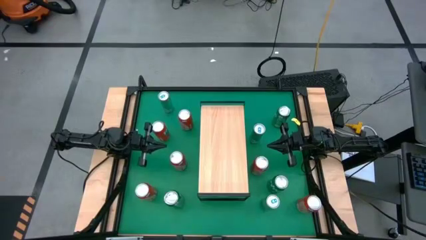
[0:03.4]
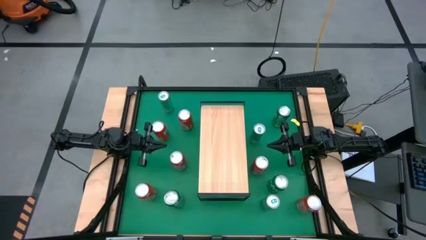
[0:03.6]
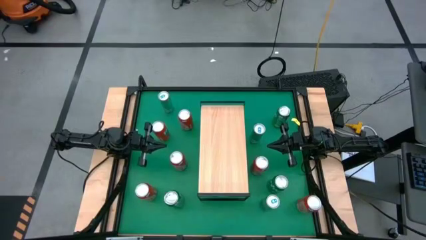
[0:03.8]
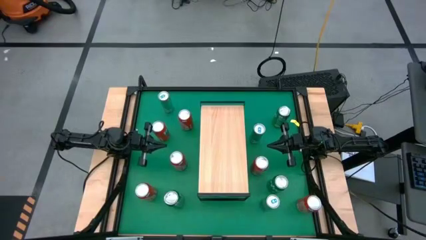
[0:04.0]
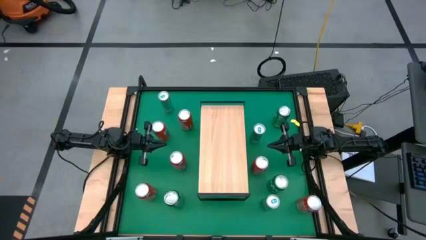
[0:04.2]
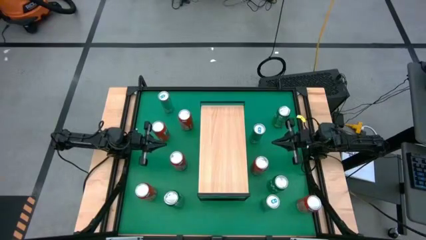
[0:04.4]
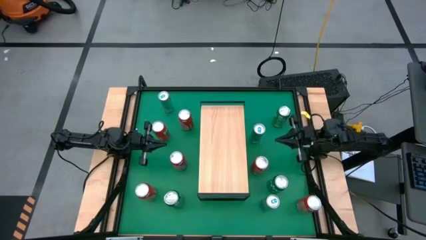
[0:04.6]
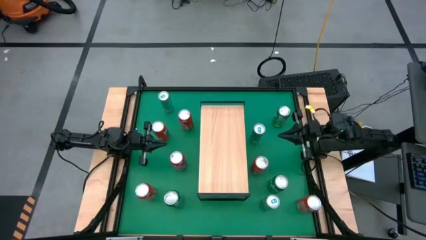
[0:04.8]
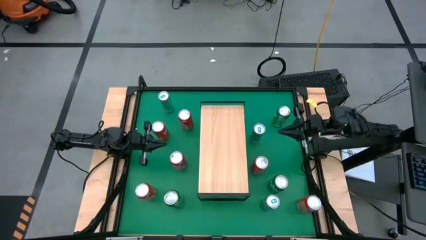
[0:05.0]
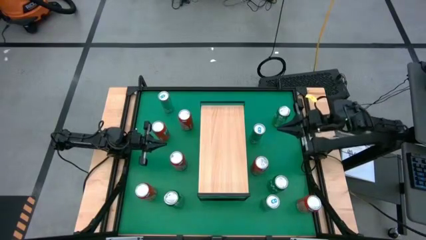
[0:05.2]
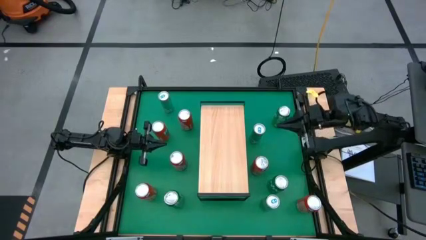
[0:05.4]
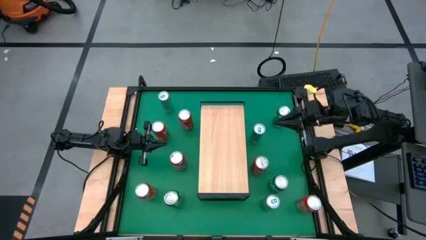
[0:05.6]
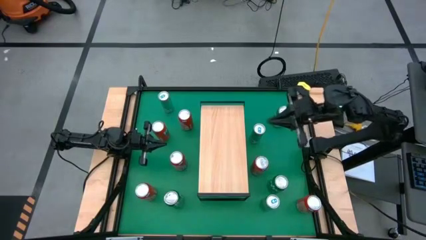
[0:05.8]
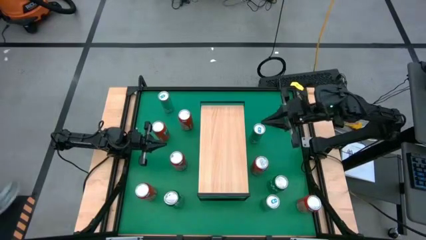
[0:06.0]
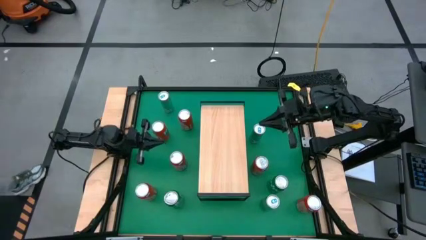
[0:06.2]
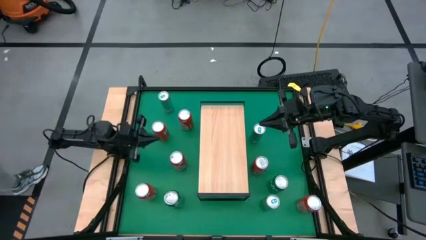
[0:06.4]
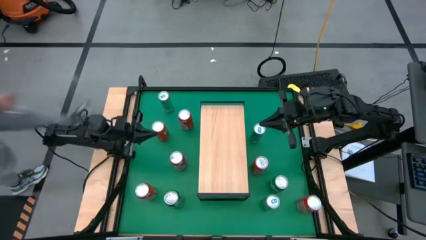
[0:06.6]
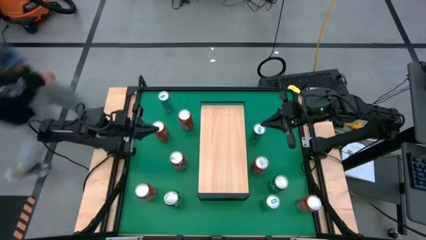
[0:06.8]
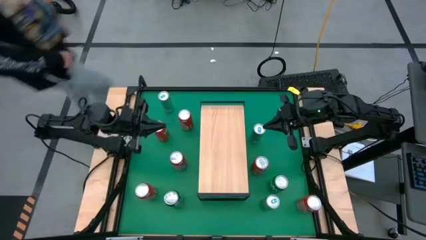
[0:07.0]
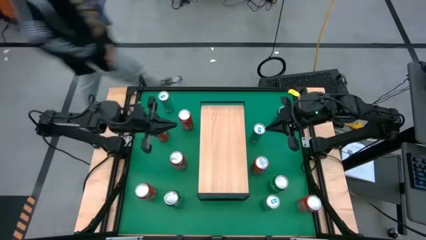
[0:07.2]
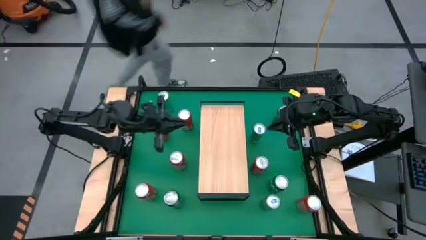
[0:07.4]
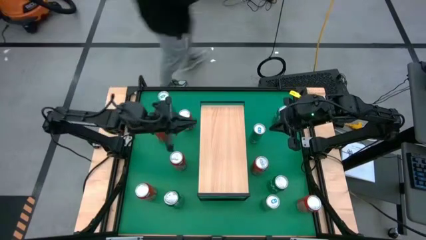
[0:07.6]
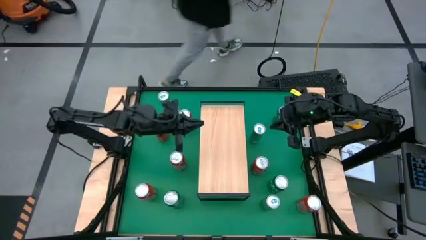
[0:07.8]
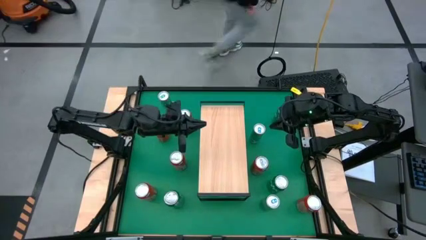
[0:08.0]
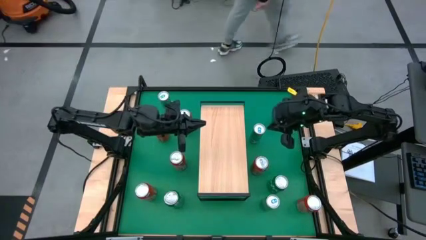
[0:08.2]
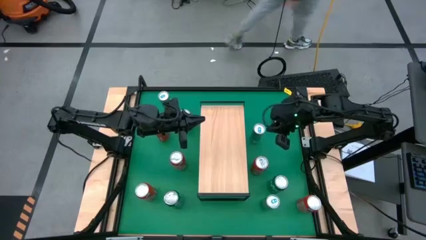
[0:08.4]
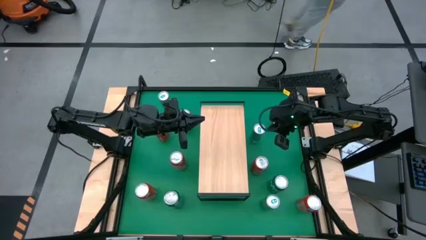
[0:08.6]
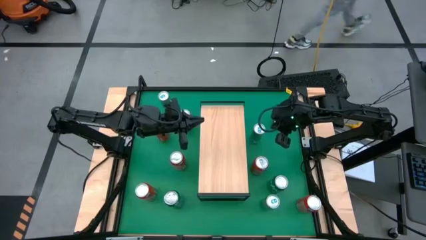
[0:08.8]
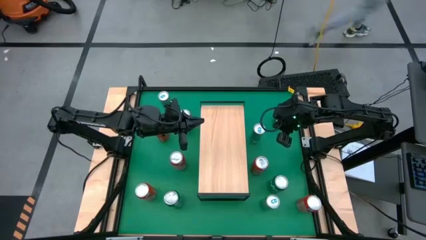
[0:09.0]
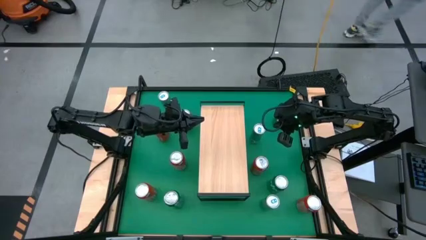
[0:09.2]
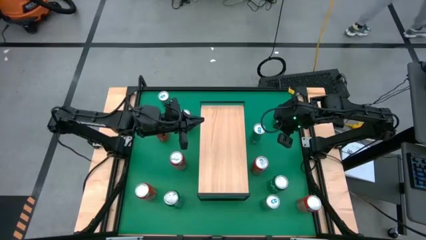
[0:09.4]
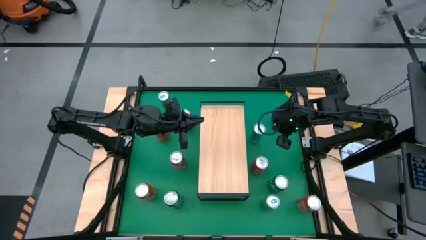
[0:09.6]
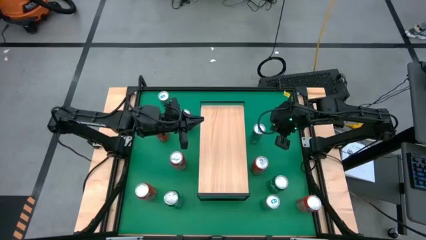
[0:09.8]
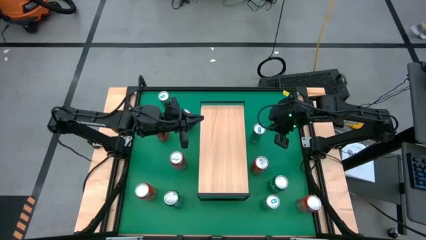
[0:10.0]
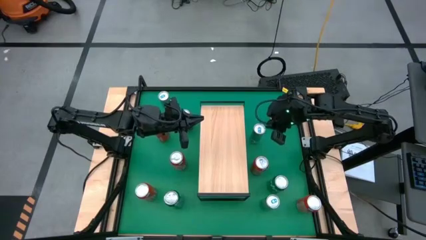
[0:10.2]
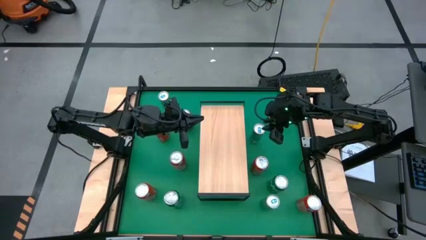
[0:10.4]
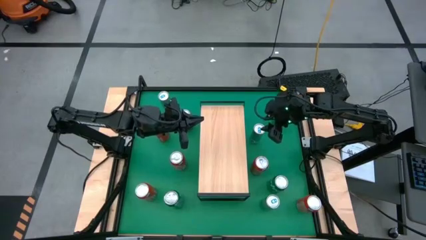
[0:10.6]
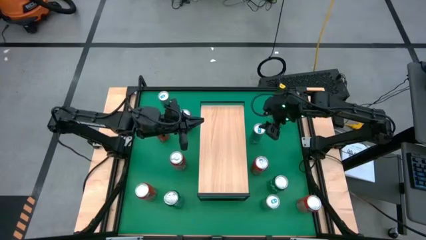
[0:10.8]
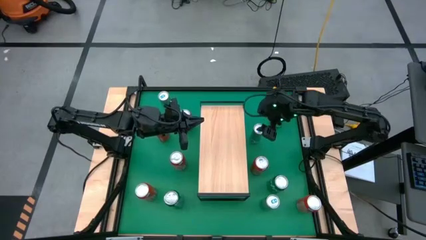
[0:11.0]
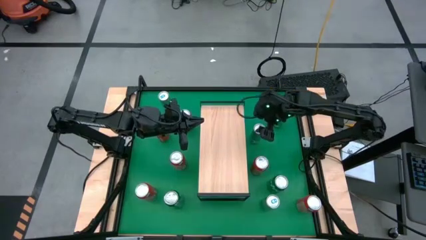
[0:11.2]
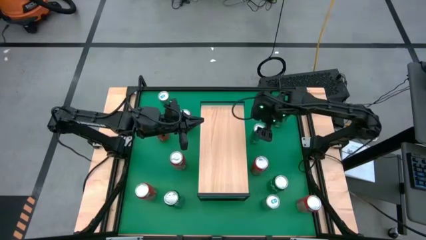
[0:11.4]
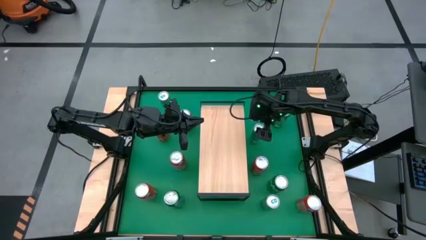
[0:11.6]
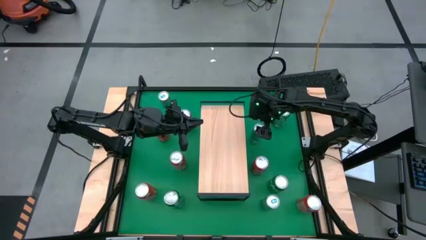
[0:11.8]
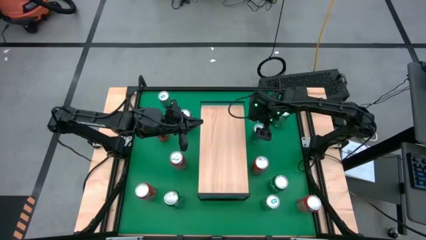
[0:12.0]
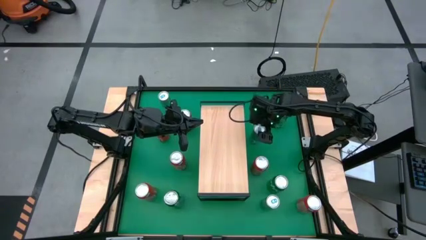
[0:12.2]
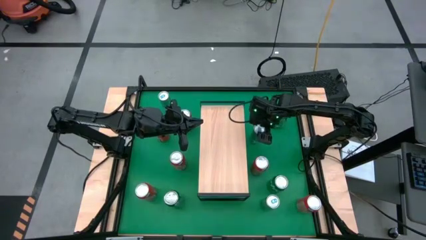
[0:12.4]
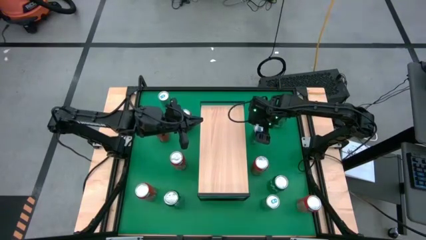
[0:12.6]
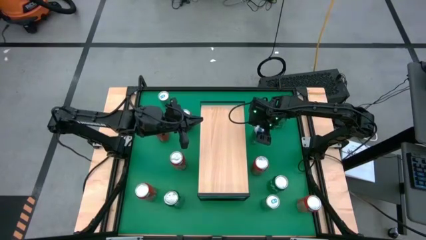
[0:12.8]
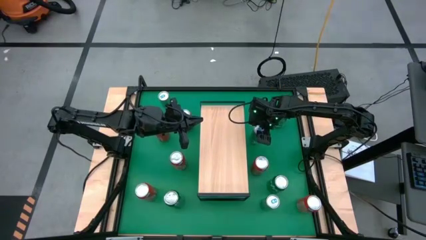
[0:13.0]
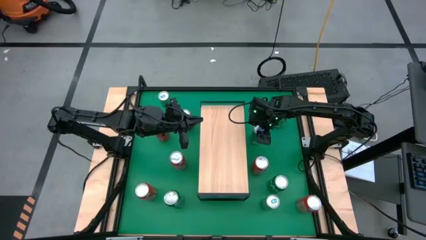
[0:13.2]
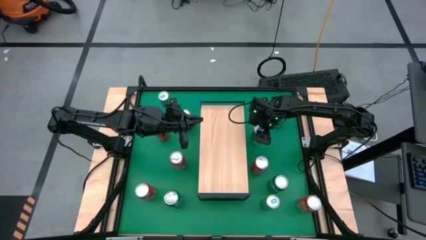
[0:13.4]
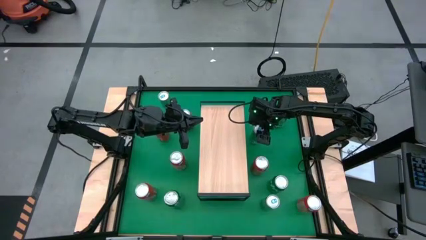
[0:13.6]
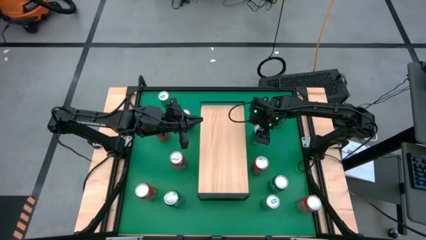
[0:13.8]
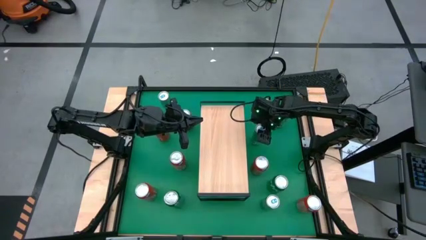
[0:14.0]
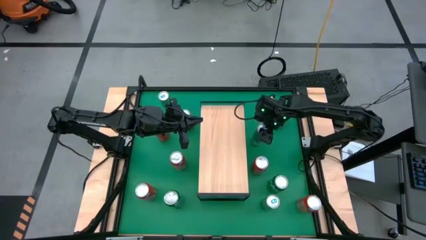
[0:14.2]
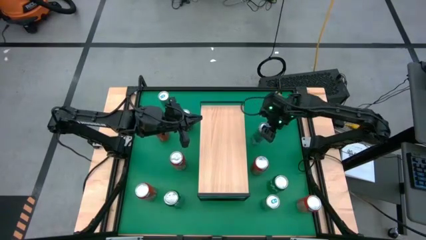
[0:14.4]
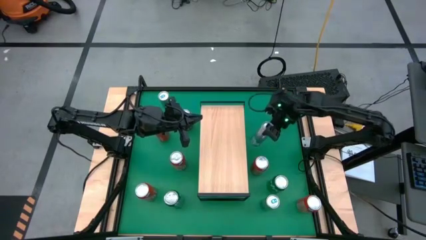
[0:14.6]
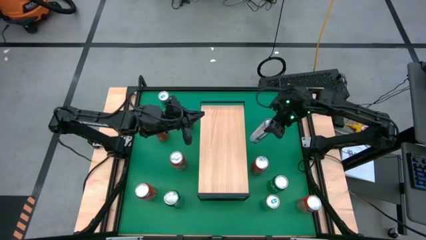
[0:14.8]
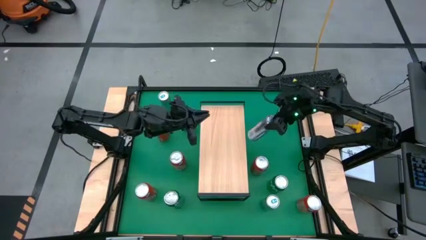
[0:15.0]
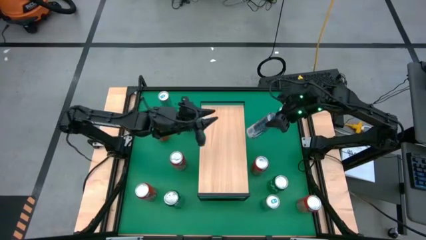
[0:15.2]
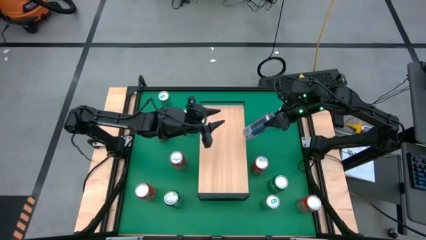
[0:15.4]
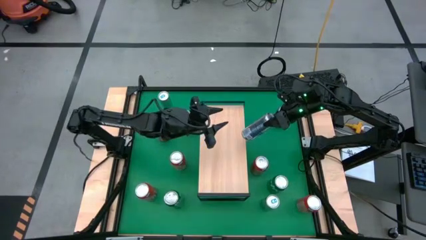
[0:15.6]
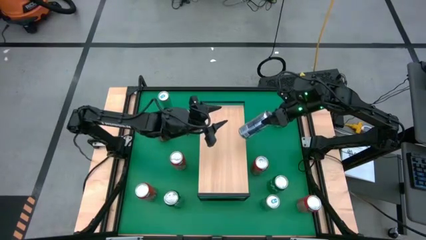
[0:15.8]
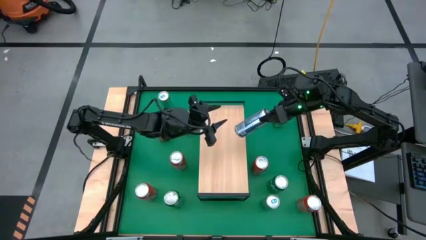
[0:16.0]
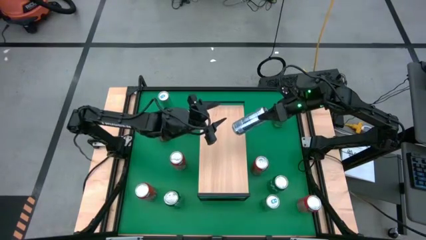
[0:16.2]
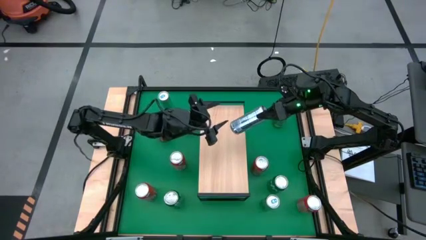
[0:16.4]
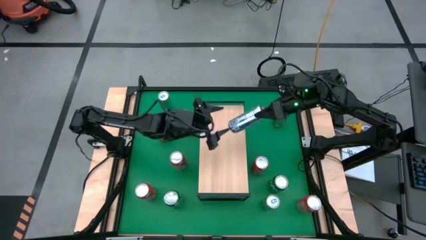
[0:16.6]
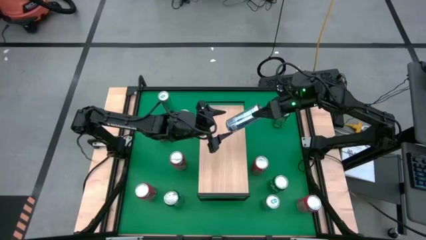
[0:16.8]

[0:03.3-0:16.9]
Task: Place canned beverage on shelf
Put the blue soda can on the shelf
